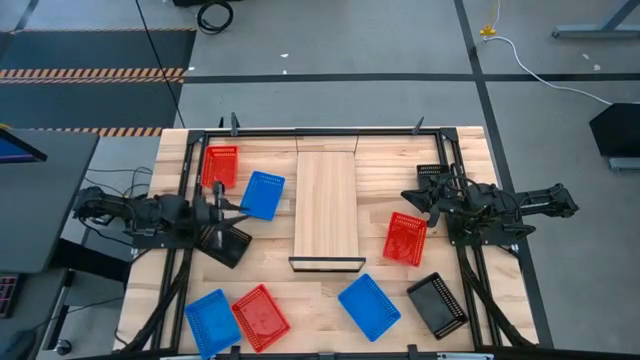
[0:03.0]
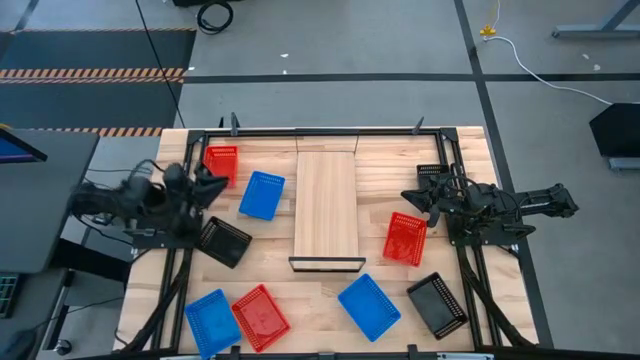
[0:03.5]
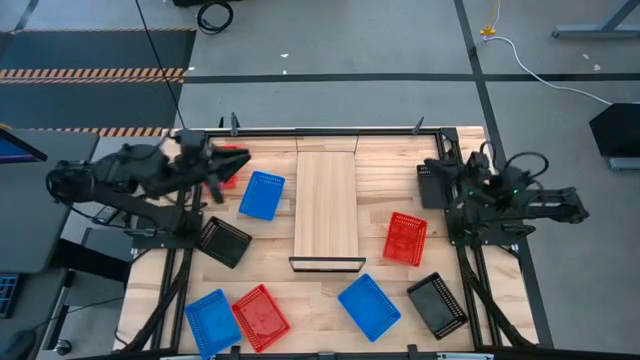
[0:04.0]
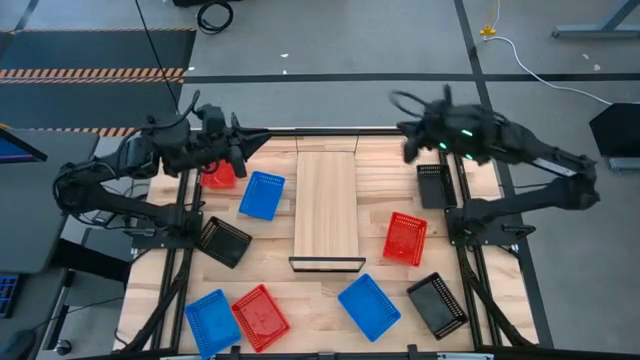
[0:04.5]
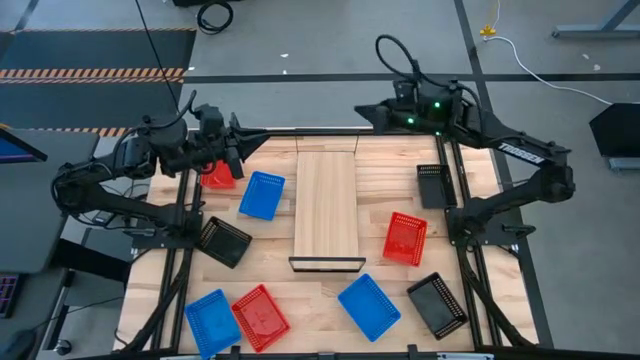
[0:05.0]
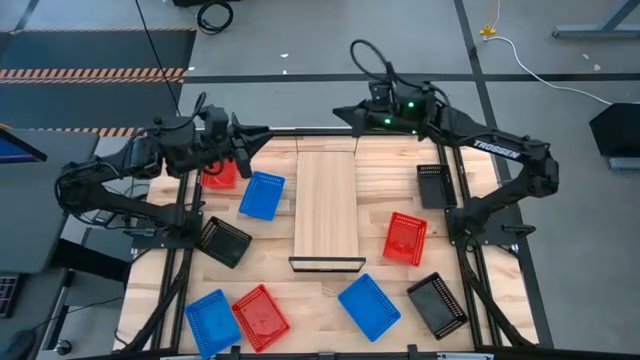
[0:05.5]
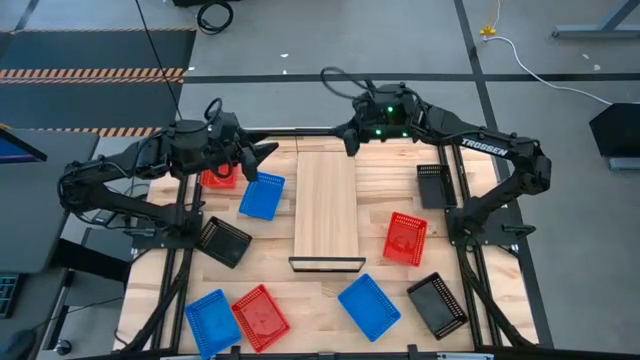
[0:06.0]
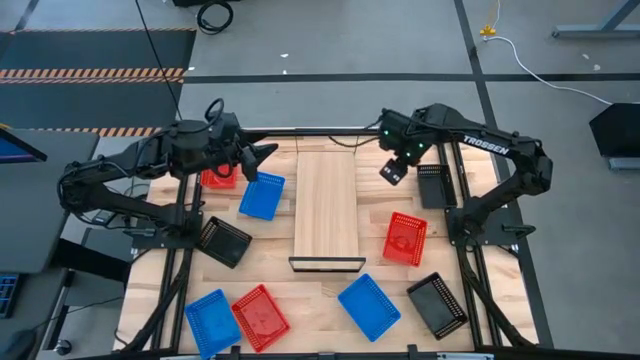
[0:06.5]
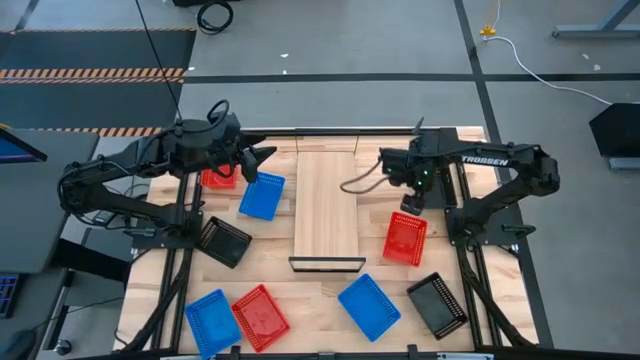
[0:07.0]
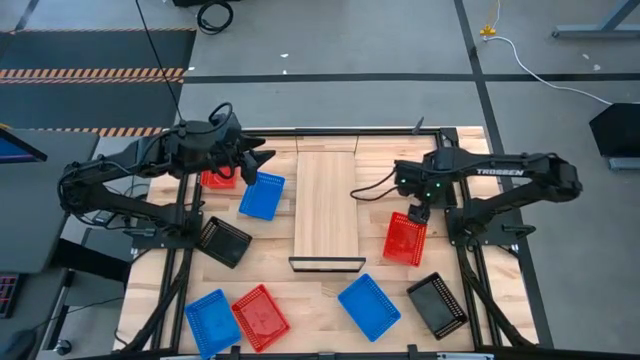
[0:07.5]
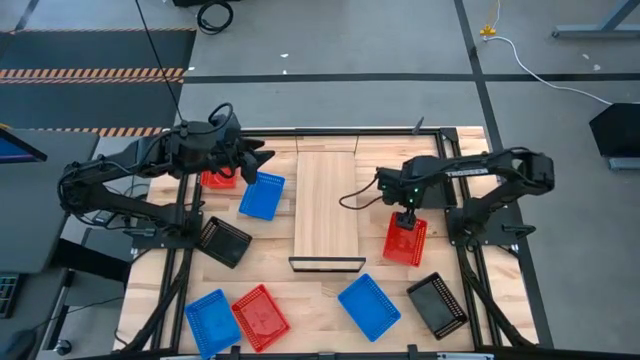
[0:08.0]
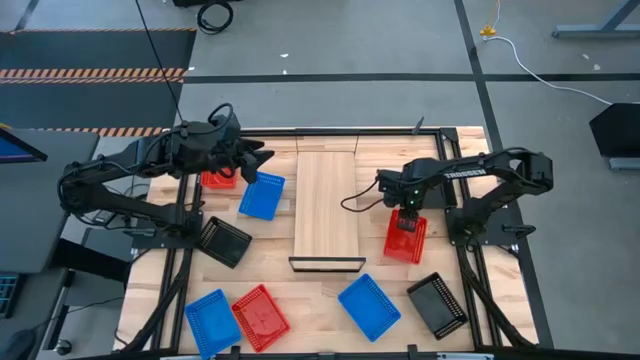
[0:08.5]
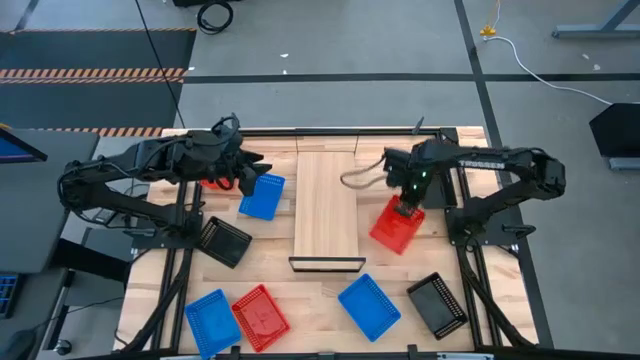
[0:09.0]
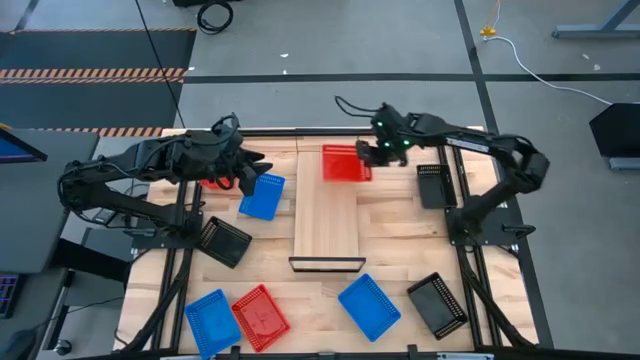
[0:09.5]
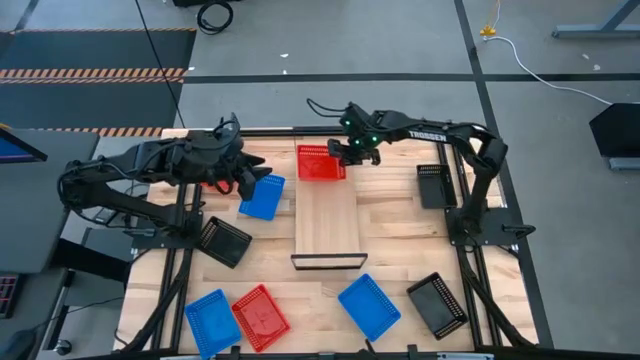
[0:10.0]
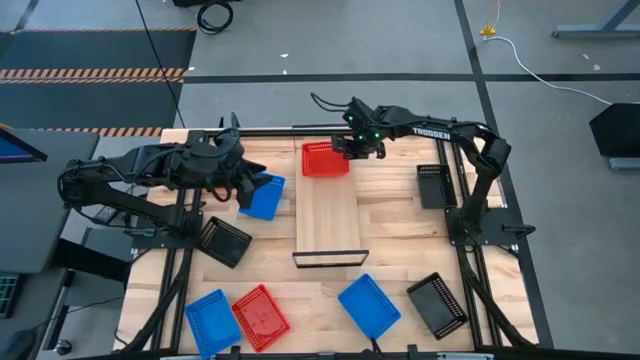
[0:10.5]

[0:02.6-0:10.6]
Task: Stack baskets on shelf by color
Put the middle right red bin on the shelf

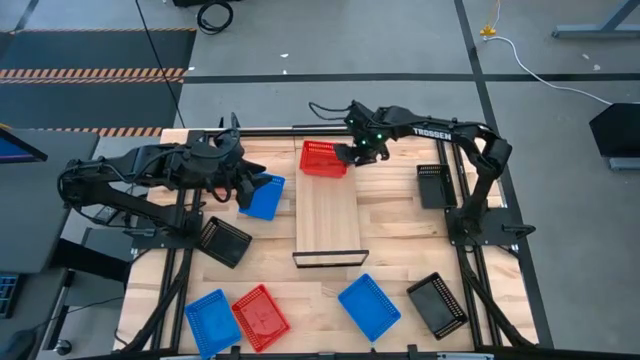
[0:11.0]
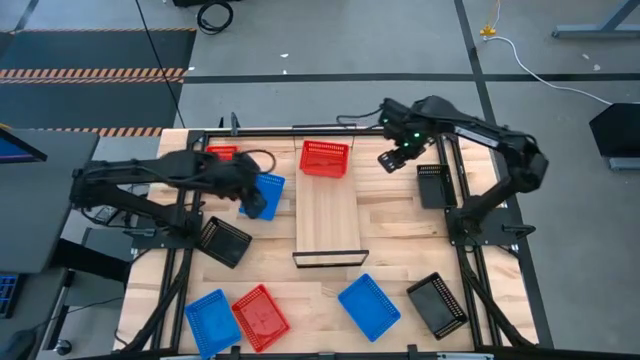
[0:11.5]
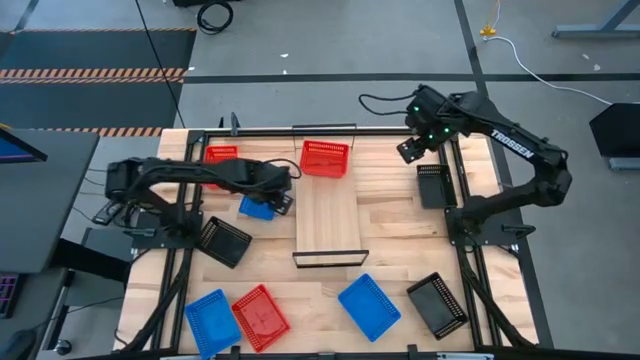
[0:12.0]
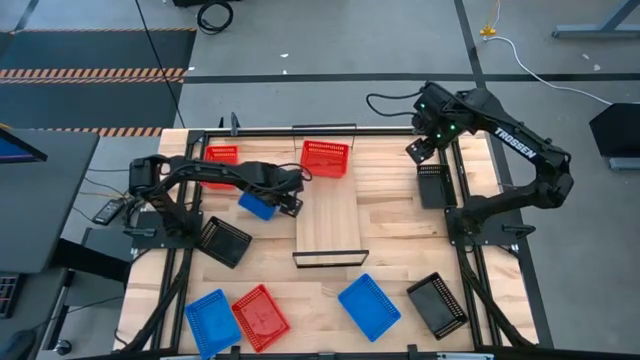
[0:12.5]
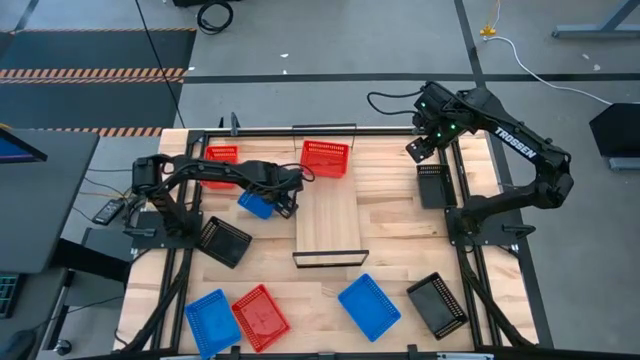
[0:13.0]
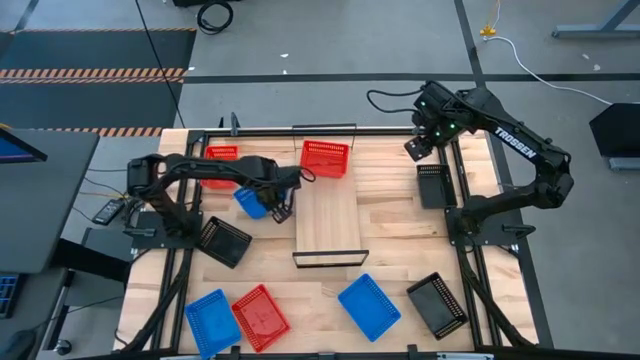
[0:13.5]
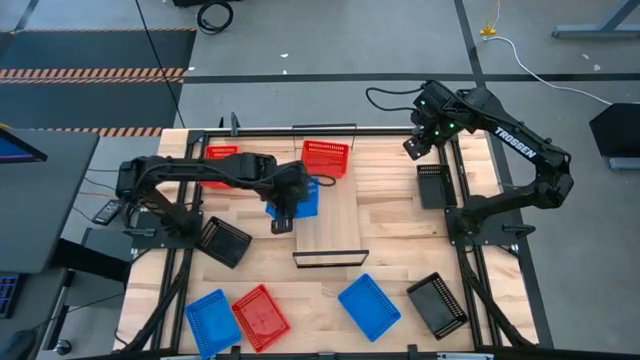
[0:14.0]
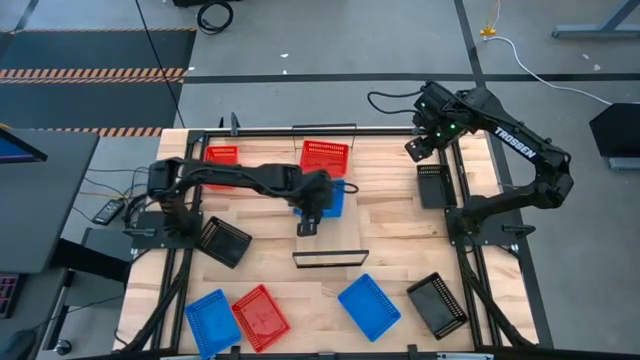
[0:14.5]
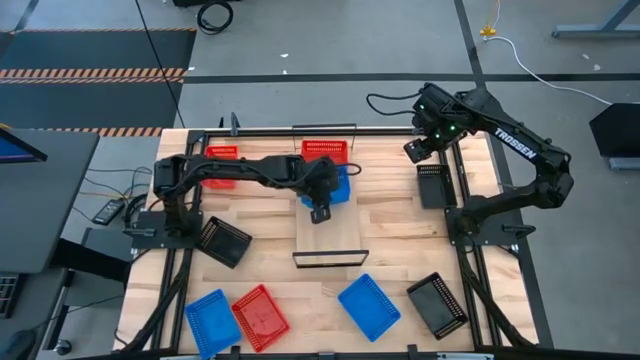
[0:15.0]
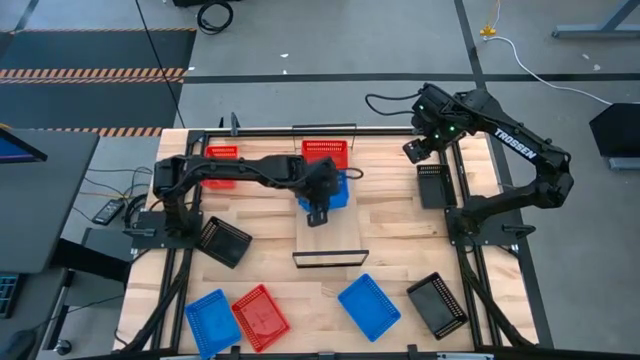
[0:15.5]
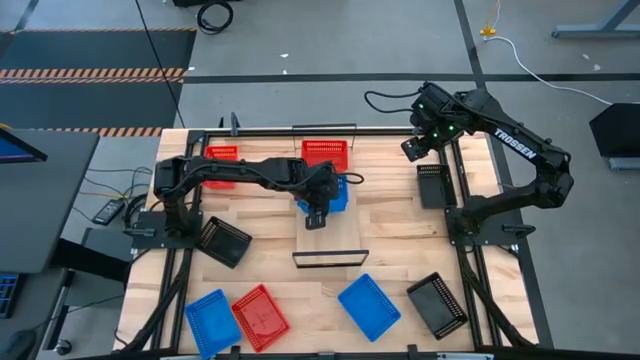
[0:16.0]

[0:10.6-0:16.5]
Put the top blue bin on the shelf

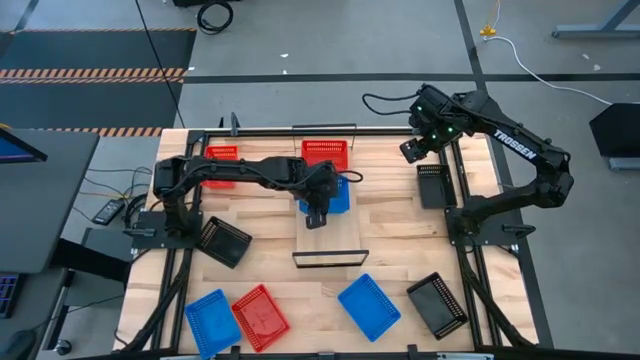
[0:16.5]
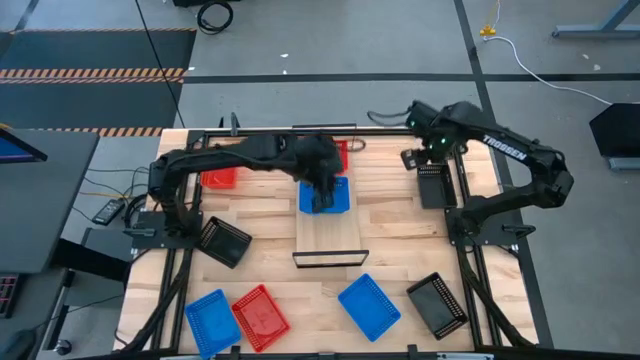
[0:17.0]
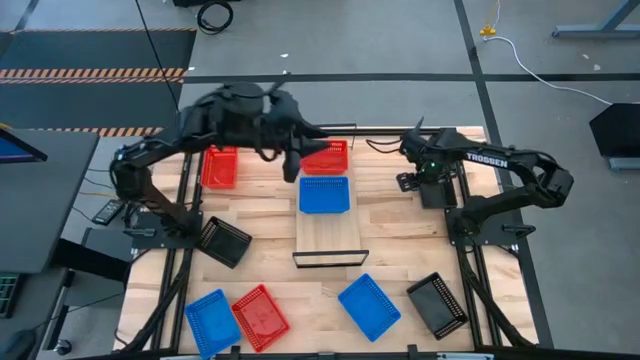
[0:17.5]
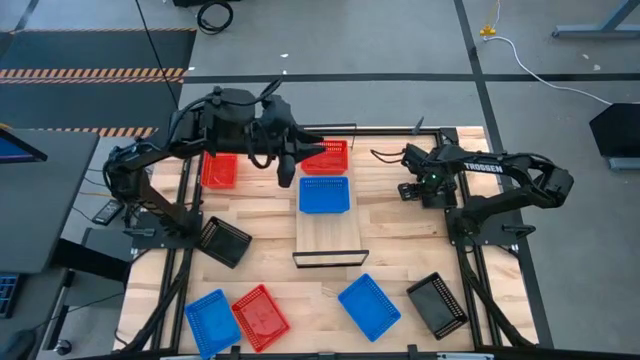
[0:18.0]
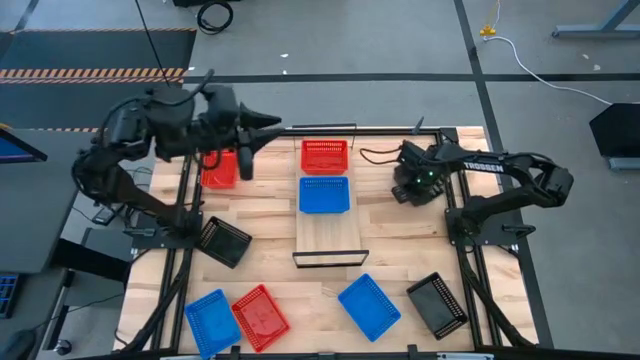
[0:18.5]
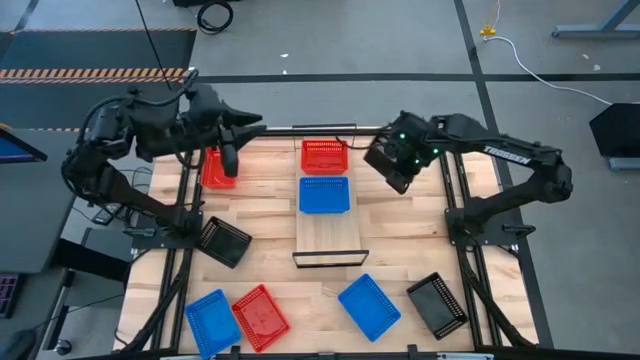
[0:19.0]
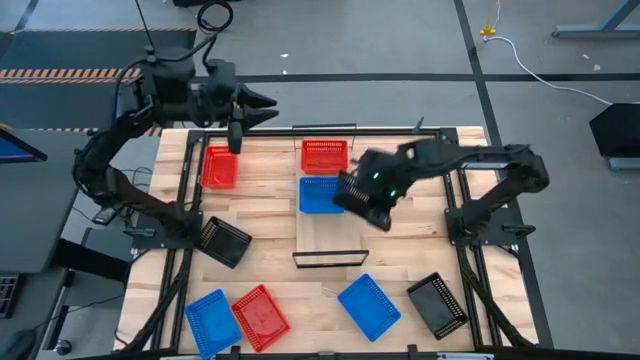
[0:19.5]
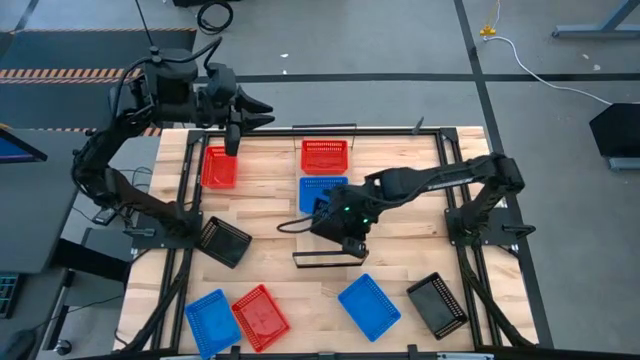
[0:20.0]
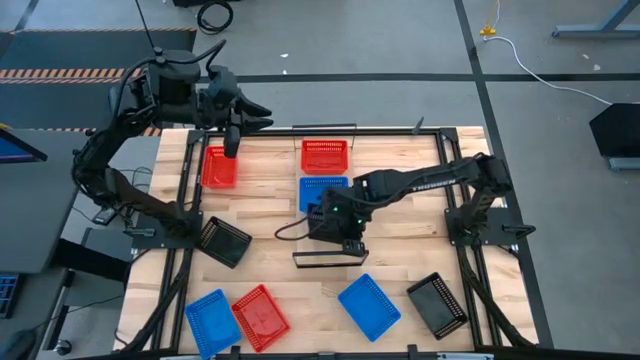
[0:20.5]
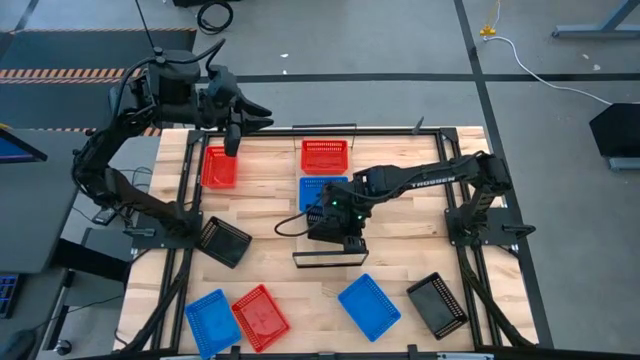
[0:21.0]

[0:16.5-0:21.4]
Put the top right black bin on the shelf

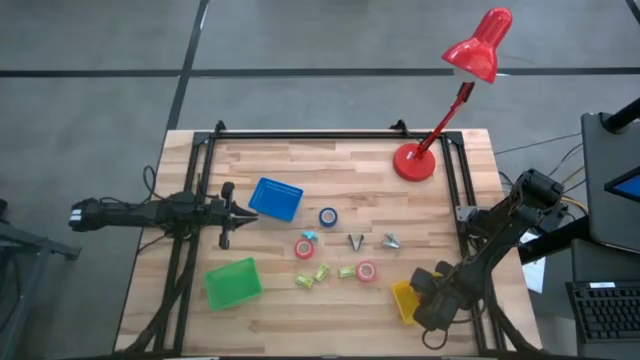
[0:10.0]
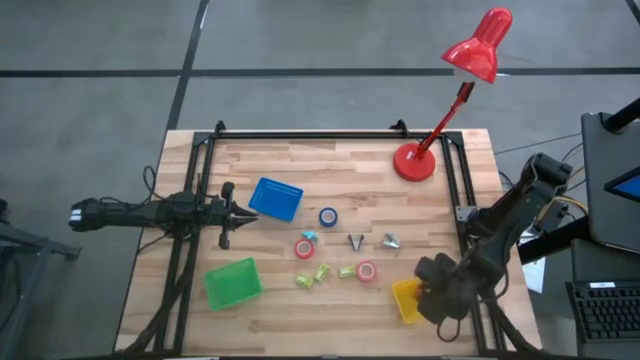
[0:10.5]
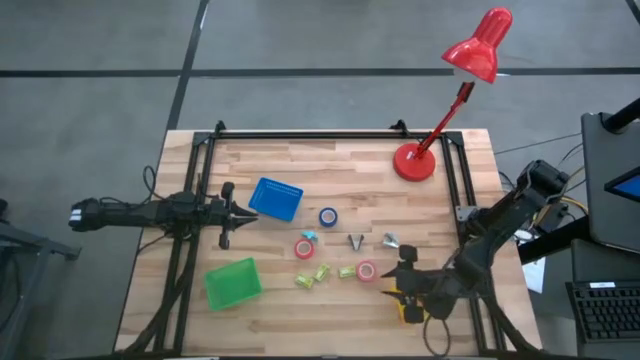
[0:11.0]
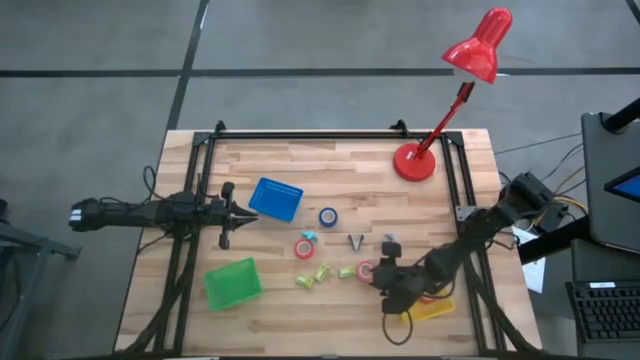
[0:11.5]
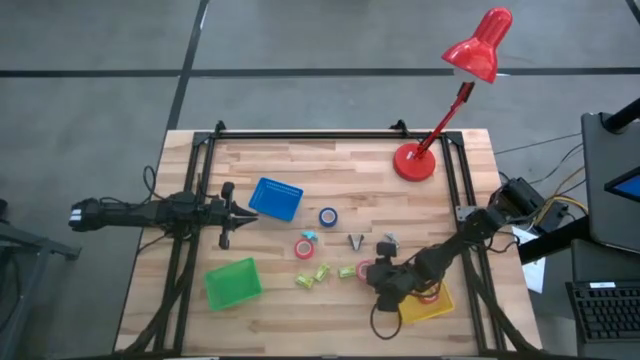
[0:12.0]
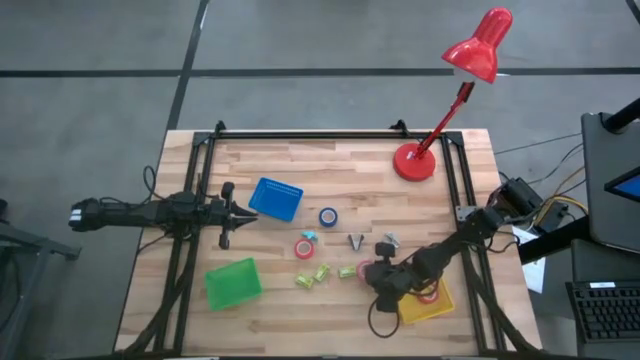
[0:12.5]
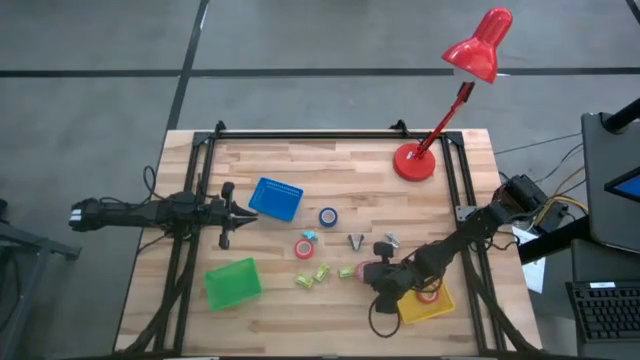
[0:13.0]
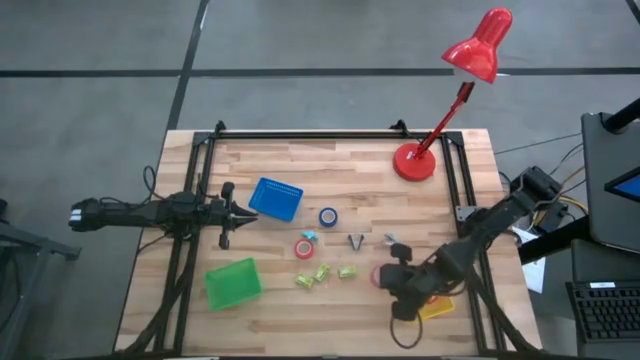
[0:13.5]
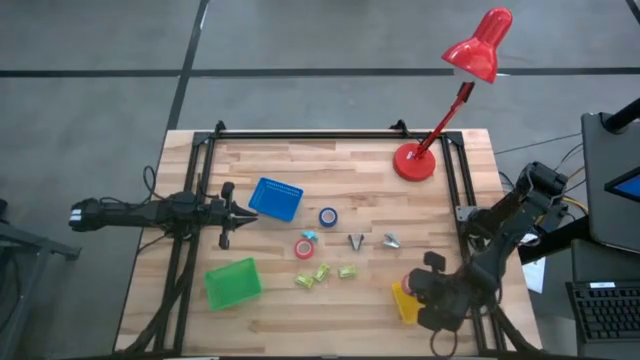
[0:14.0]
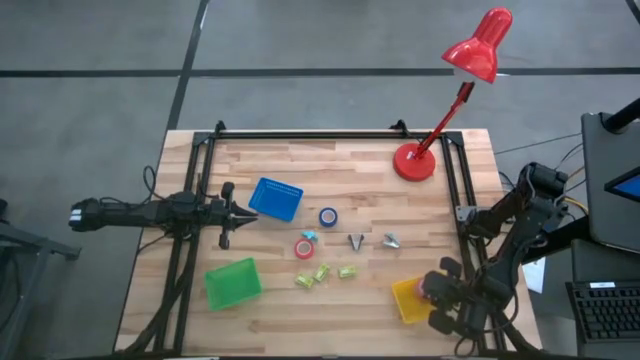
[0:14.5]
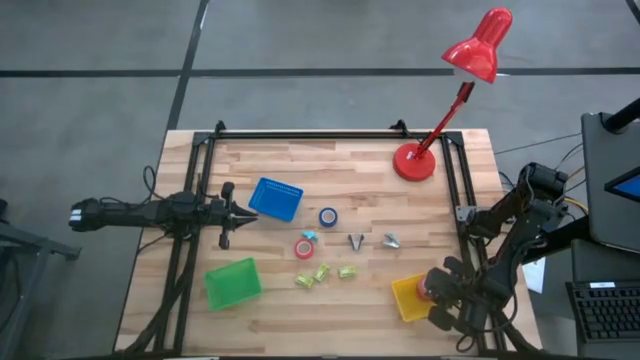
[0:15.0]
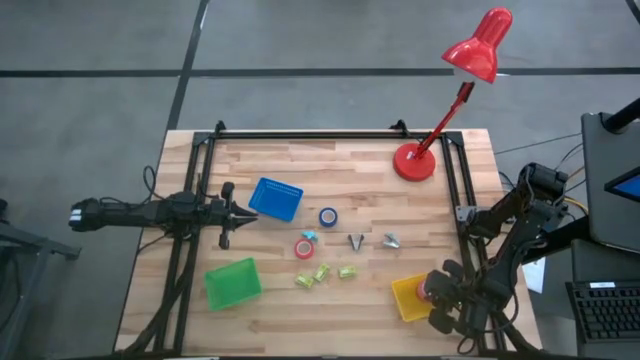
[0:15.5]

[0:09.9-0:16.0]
Task: Pick and place Stapler, Stapler remover, tape
Put the pink tape into the yellow bin
